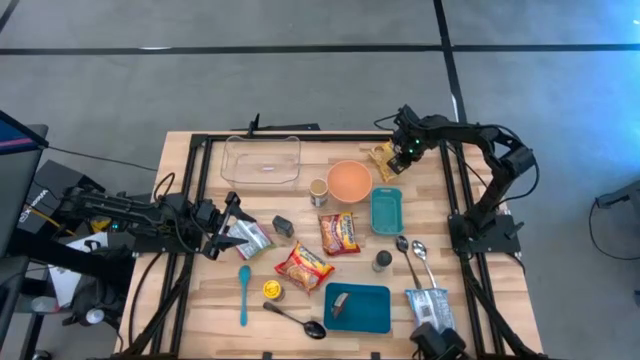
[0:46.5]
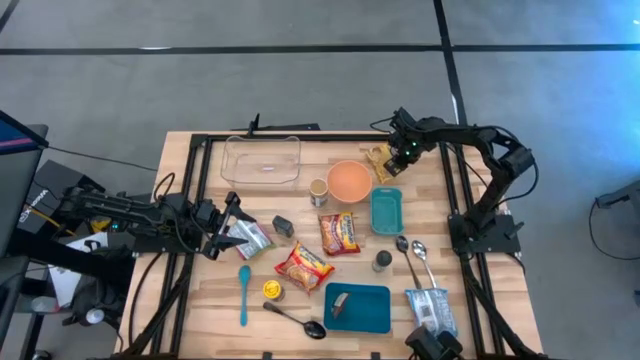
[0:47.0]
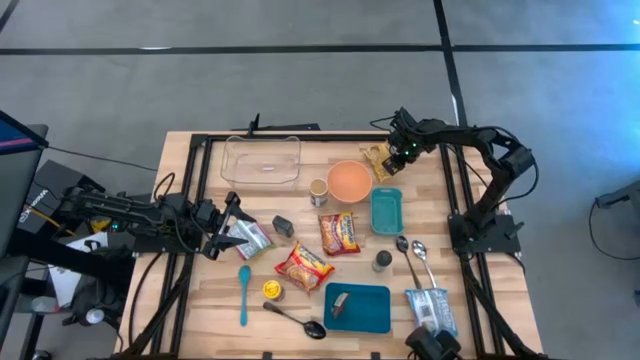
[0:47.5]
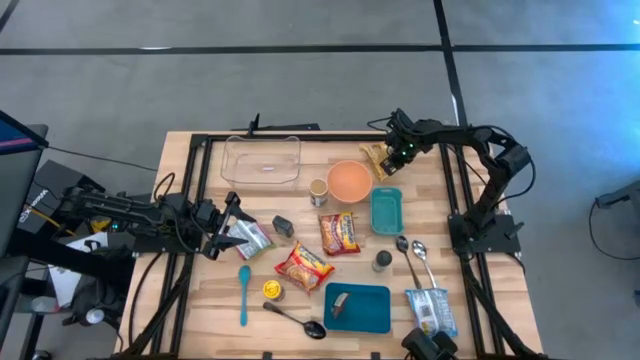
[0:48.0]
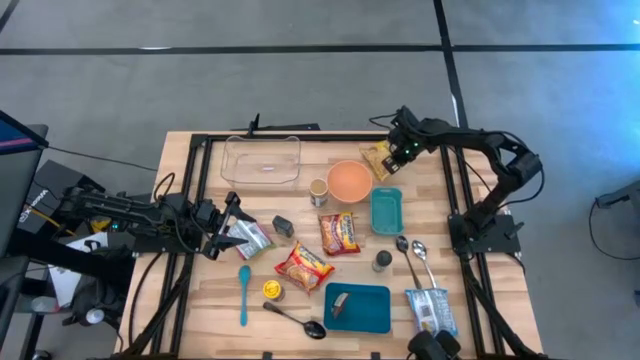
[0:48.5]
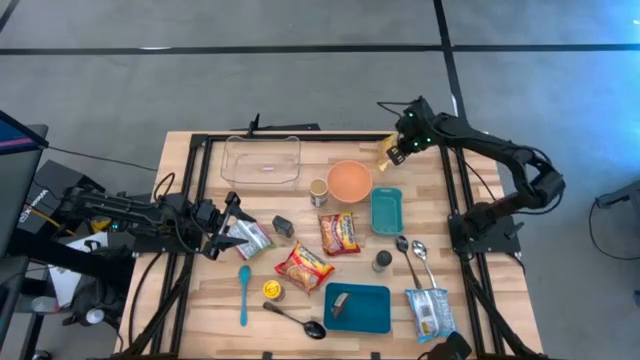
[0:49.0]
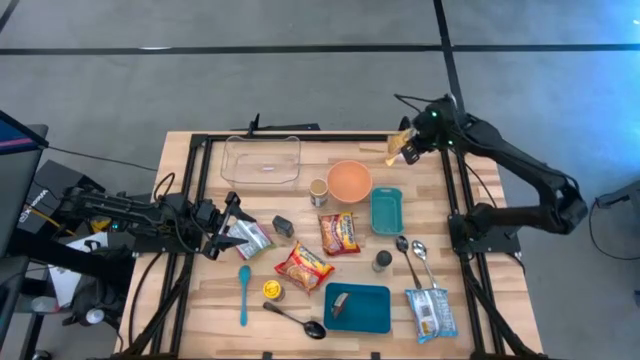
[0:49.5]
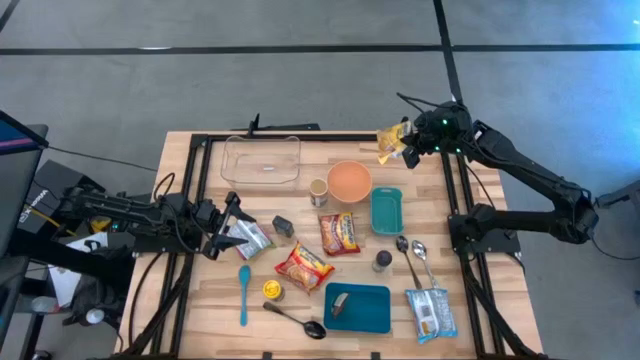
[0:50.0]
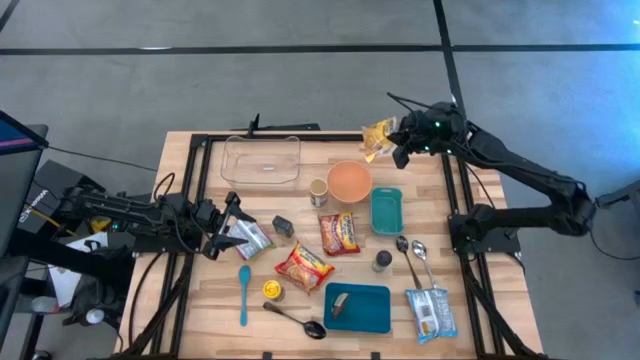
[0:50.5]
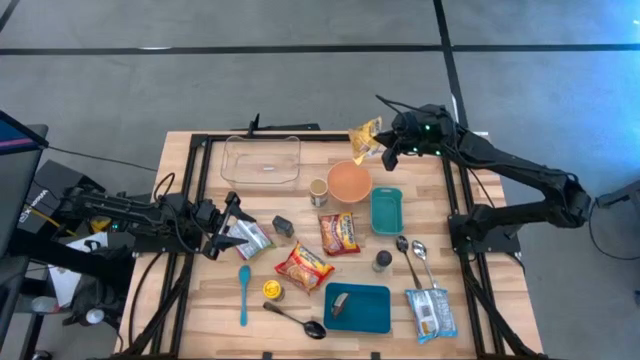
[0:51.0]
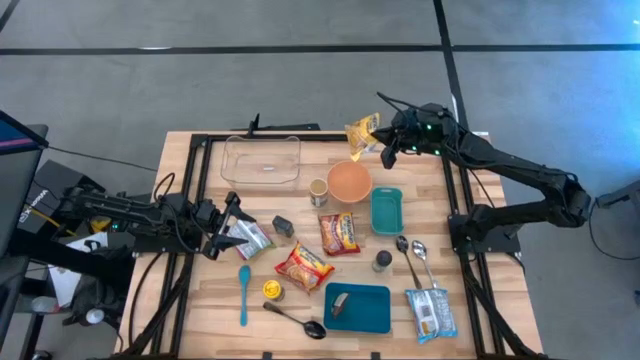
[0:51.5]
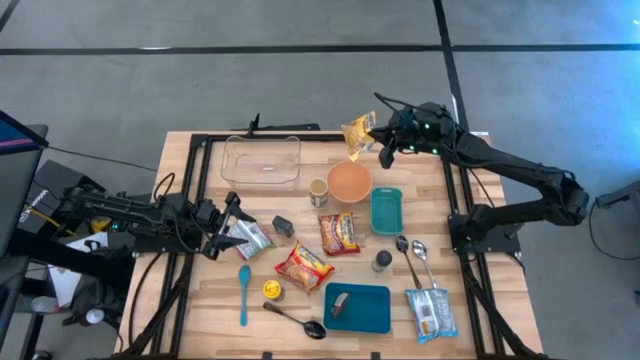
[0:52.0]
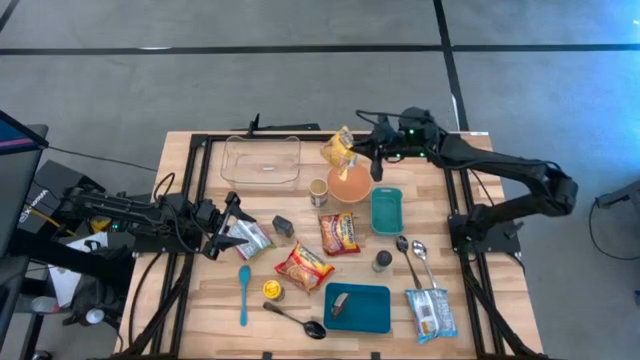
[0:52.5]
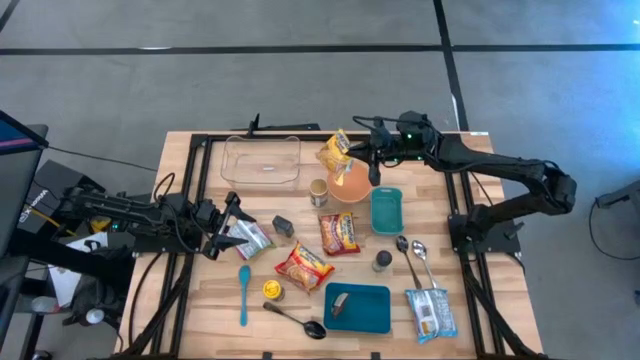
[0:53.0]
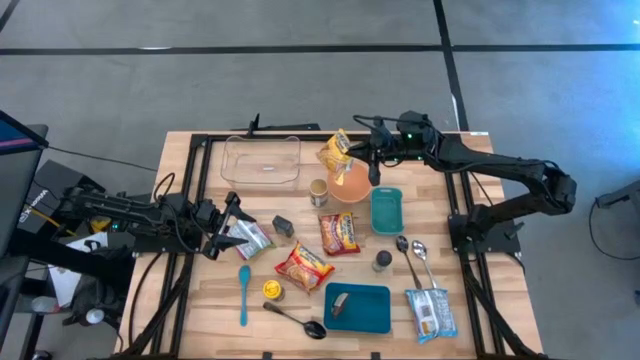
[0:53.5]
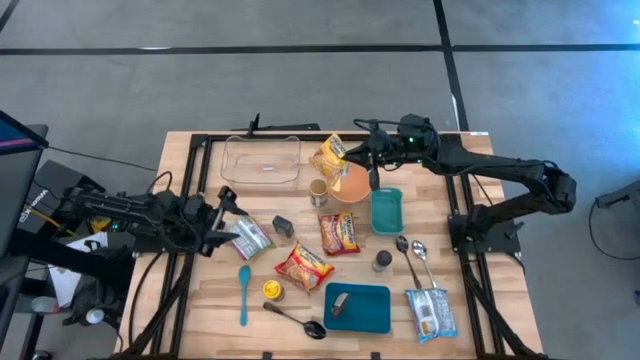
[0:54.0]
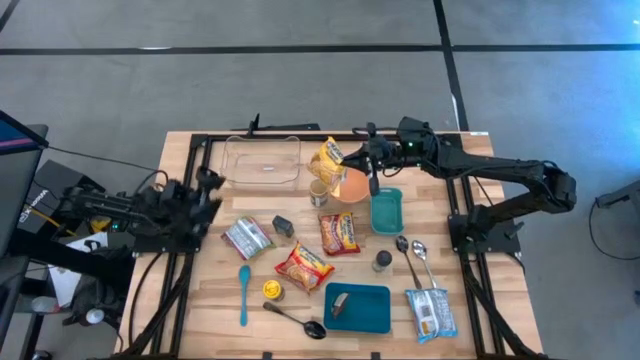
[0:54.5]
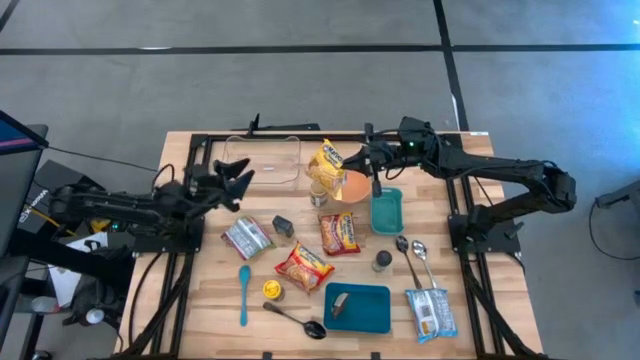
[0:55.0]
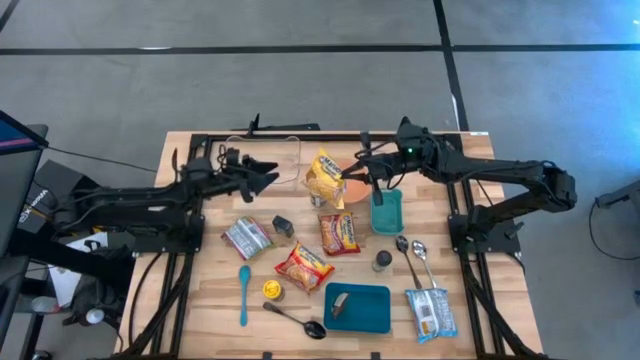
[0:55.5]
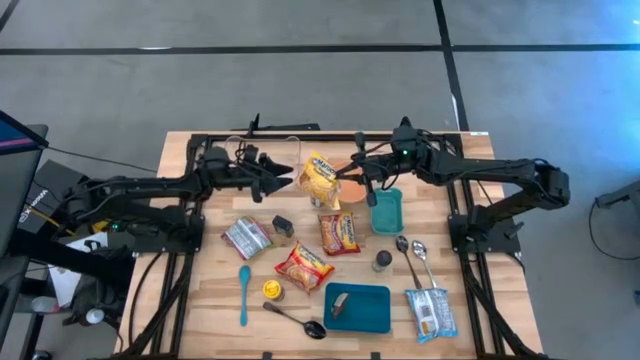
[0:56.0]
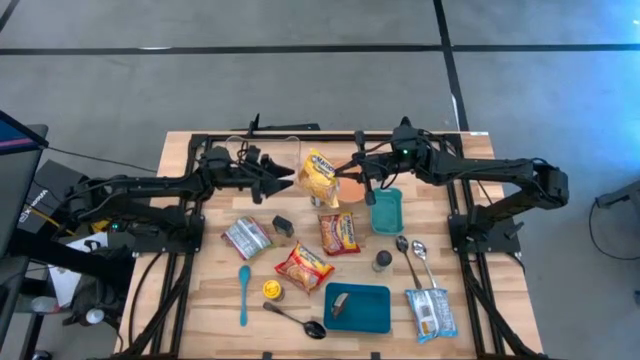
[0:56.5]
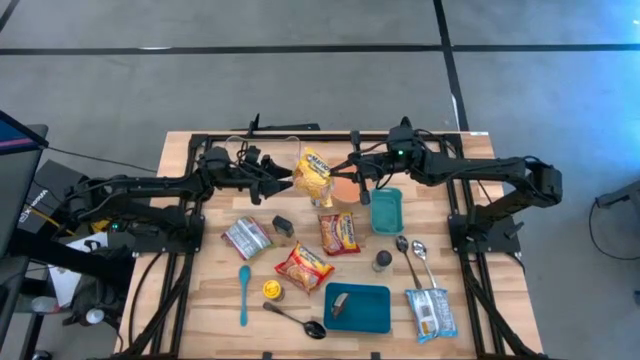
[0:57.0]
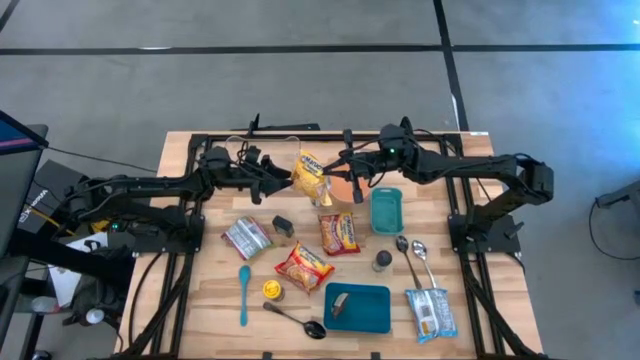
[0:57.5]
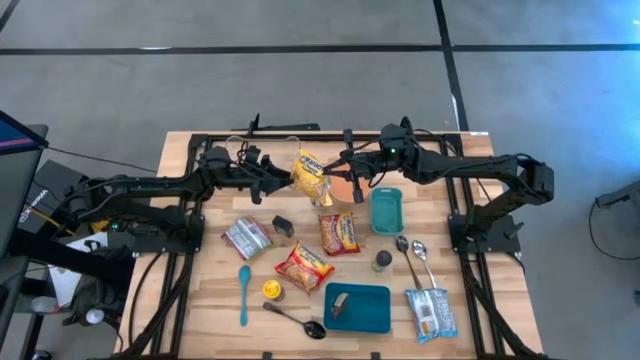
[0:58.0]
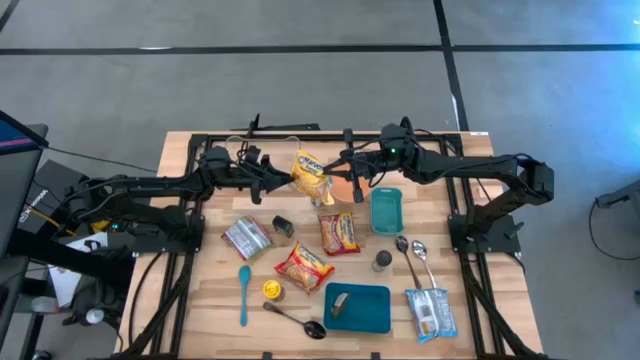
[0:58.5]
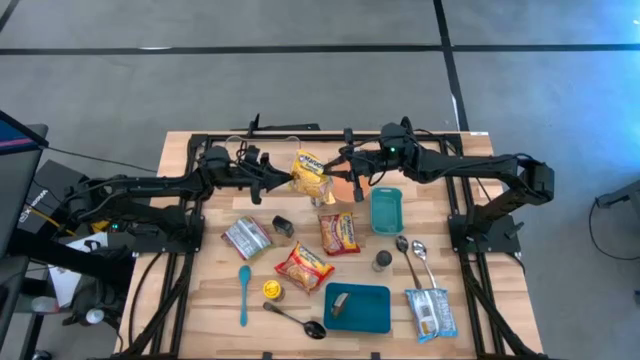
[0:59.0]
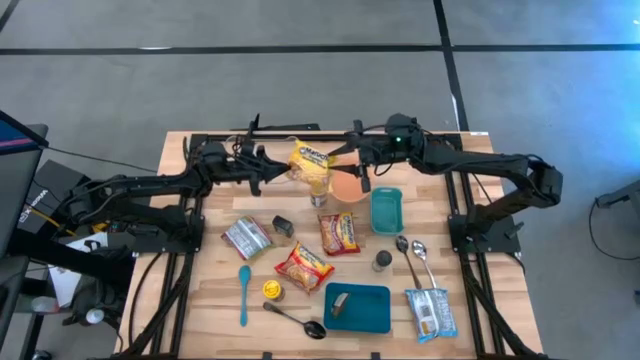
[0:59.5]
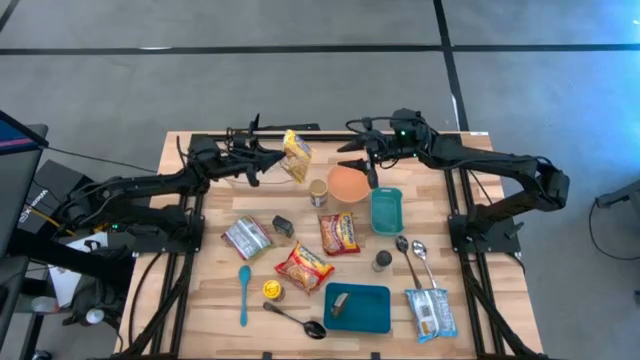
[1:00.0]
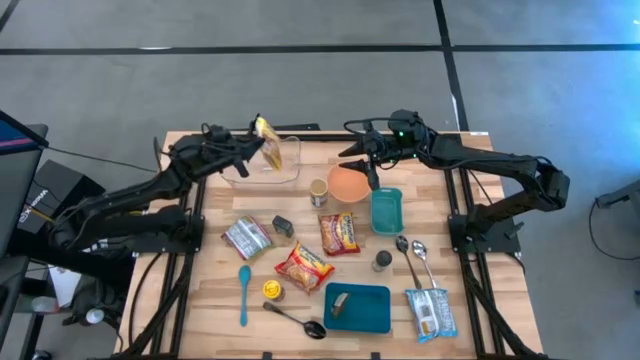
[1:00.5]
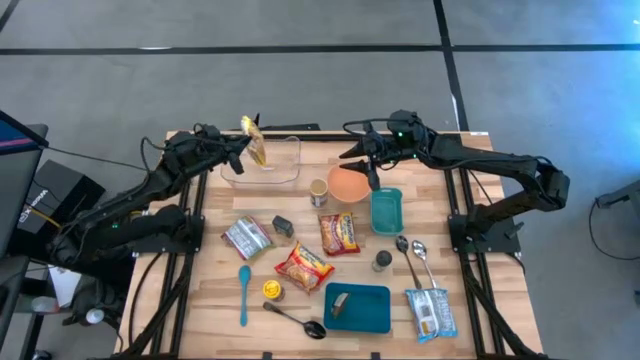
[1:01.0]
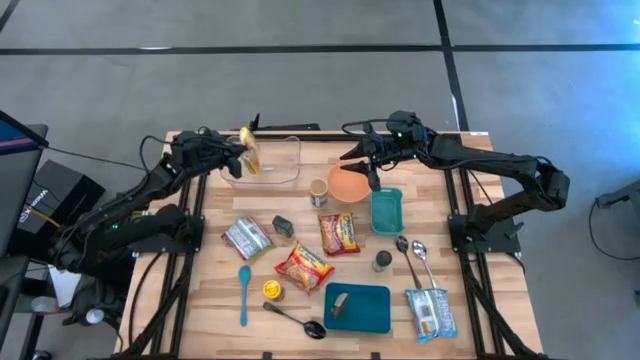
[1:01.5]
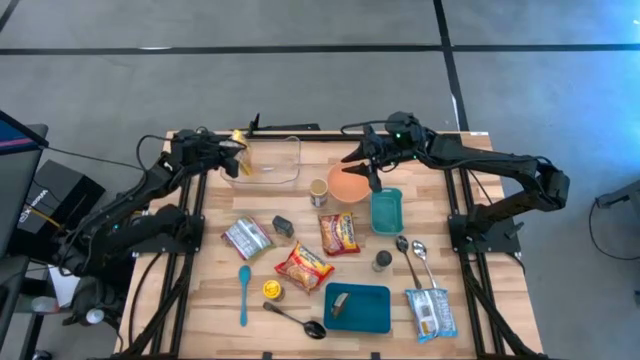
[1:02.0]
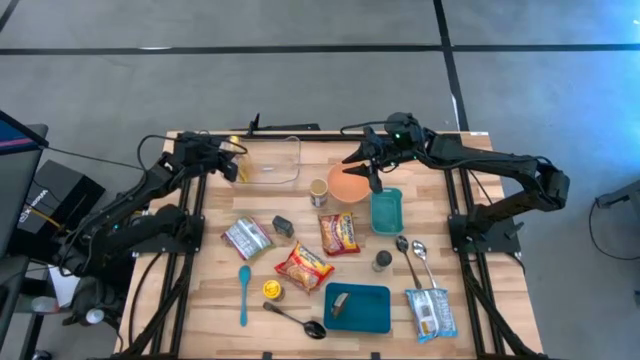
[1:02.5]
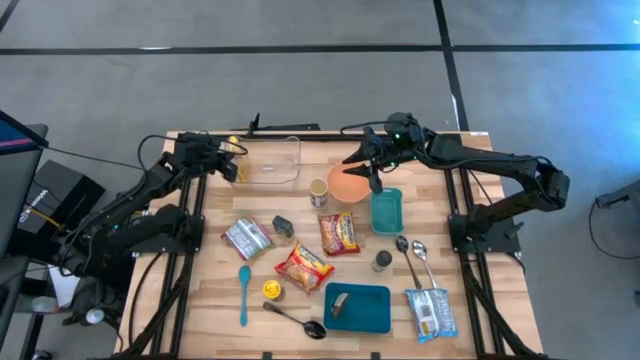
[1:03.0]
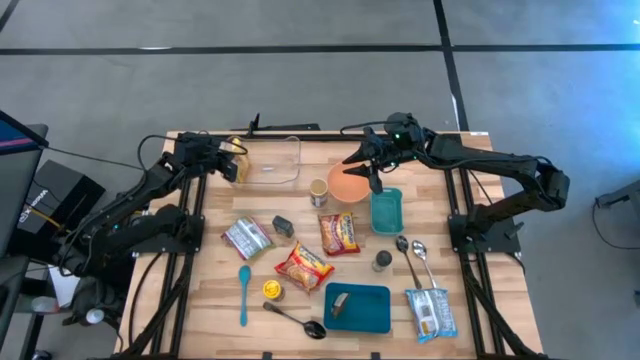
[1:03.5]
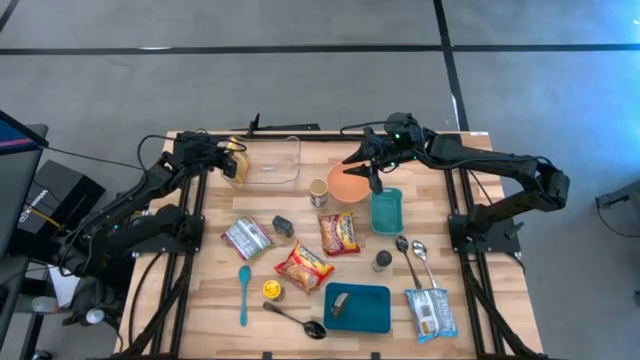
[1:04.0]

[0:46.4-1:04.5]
Task: Pick & Place Food Item
Put the yellow noodle pack into the transparent bin

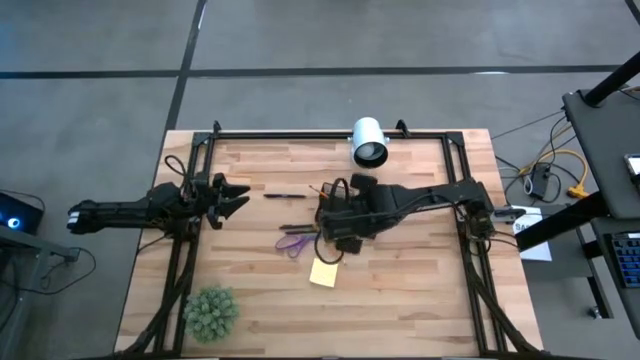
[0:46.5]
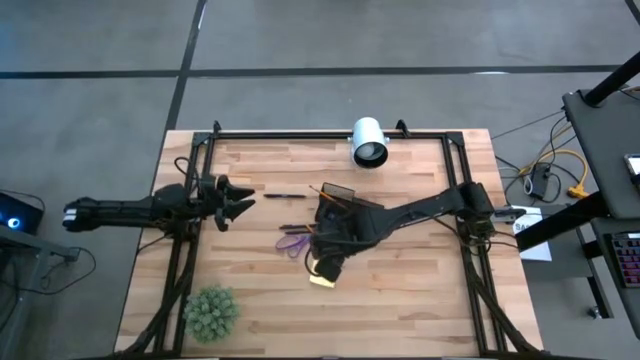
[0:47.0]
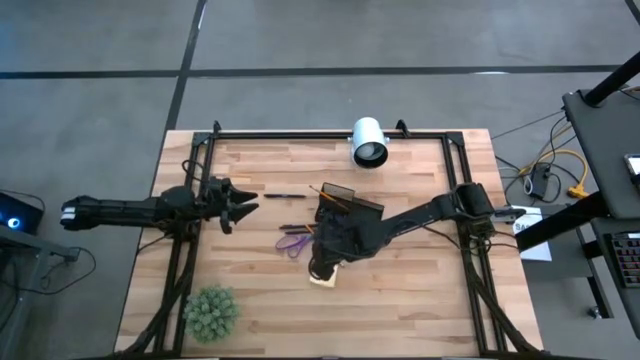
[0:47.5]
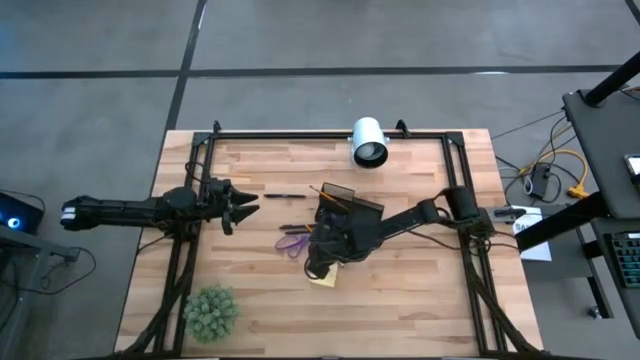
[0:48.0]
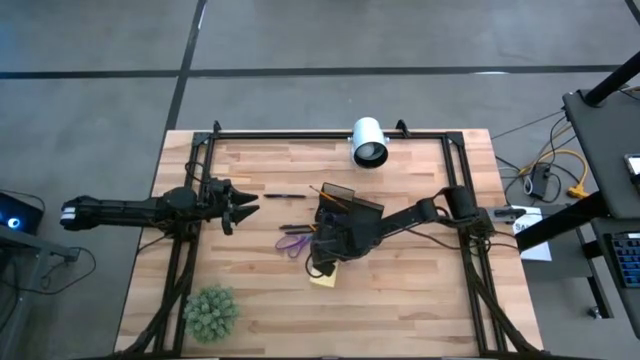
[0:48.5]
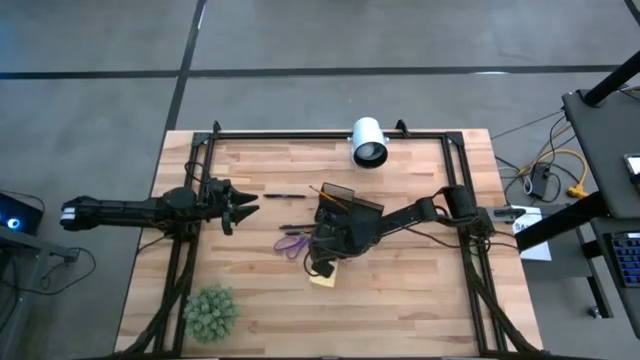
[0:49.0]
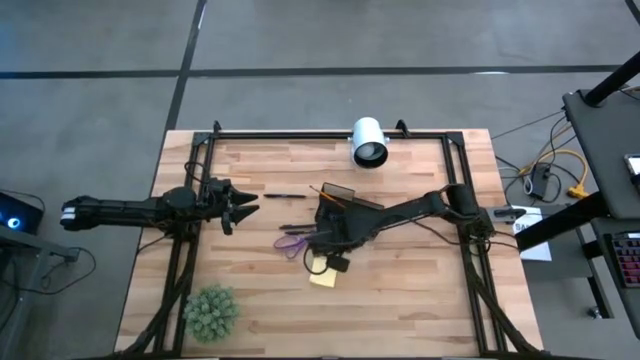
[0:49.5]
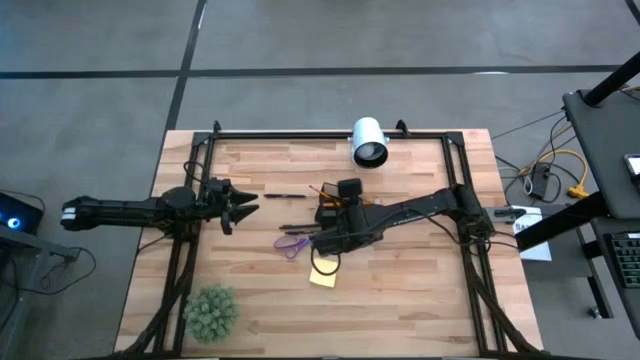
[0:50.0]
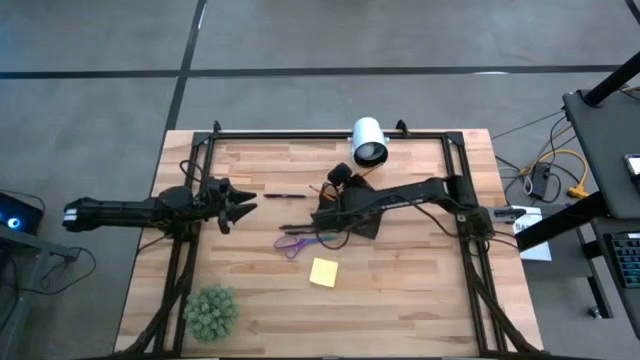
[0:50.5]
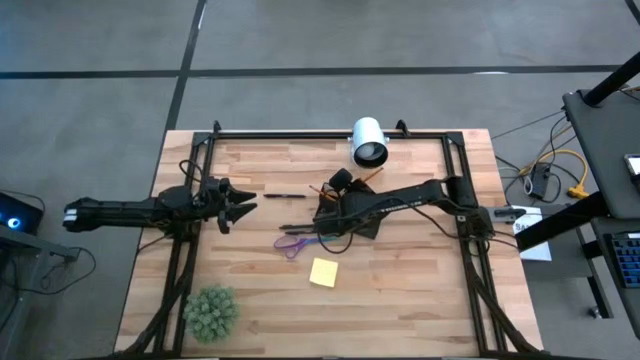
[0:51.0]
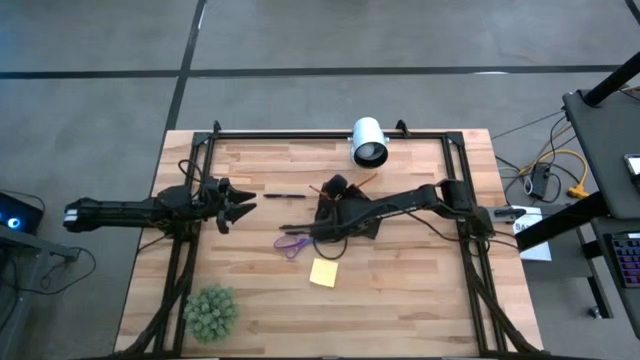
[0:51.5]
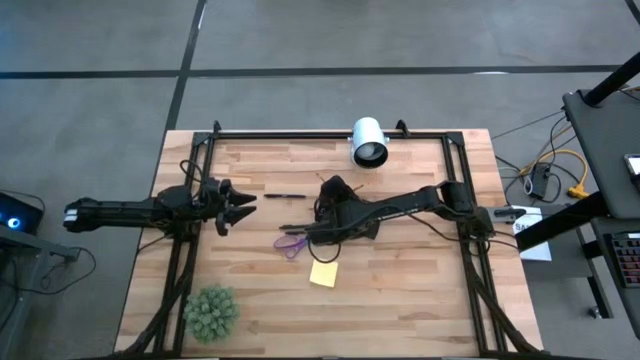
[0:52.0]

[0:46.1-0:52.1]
Task: Pick and place office supplies into organizer
Put the yellow pencil into the black mesh organizer
